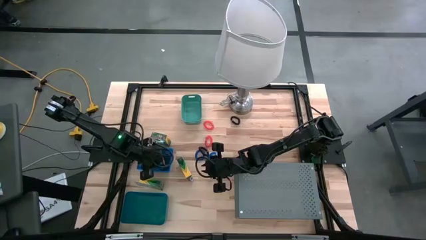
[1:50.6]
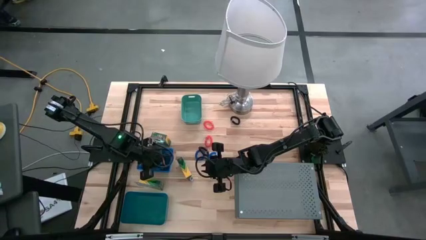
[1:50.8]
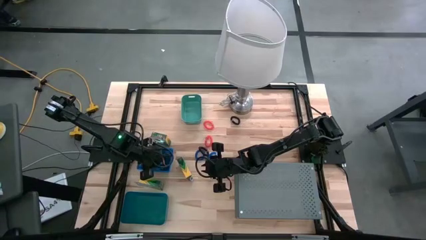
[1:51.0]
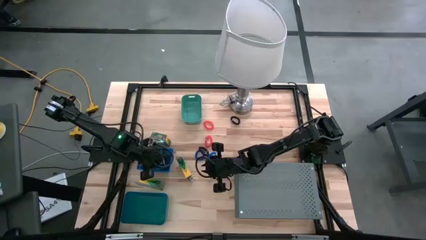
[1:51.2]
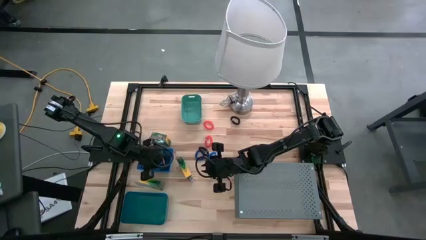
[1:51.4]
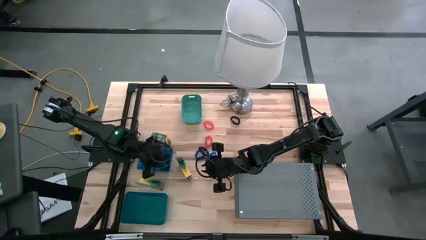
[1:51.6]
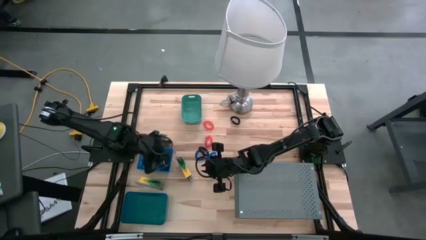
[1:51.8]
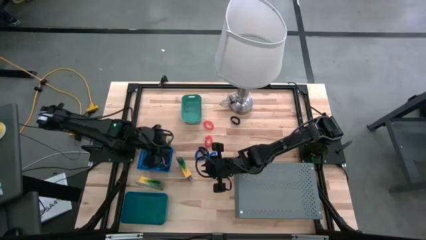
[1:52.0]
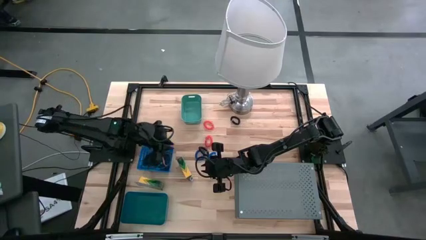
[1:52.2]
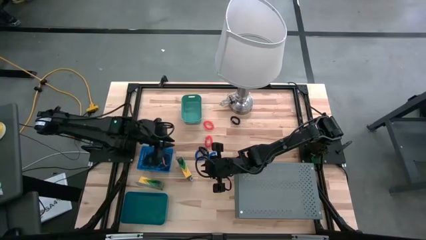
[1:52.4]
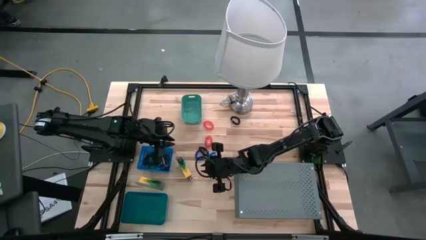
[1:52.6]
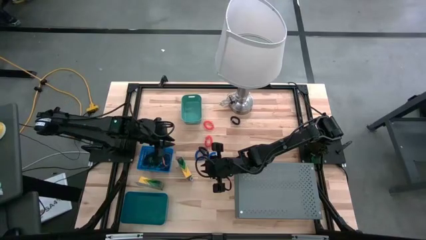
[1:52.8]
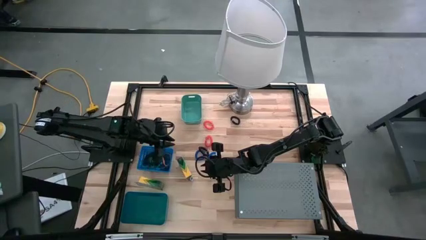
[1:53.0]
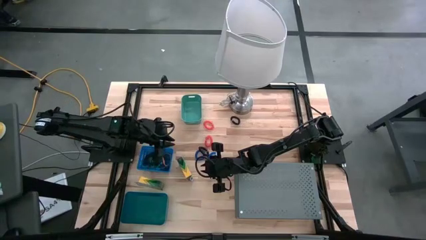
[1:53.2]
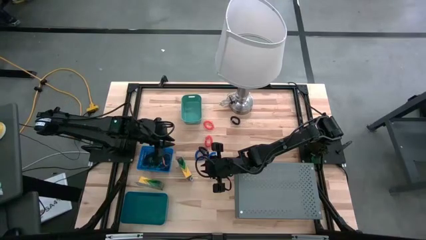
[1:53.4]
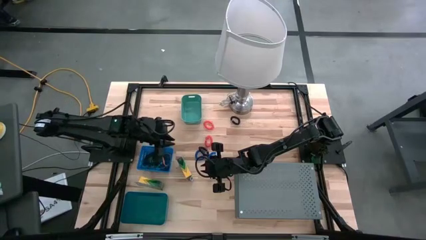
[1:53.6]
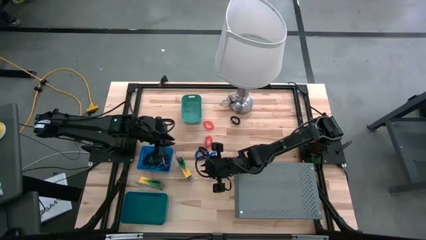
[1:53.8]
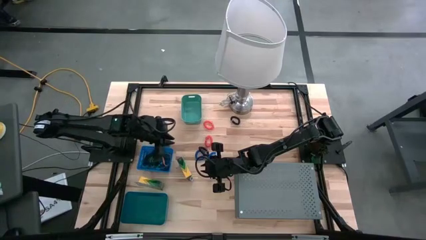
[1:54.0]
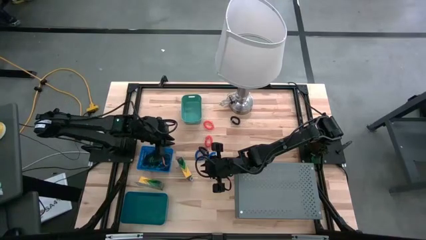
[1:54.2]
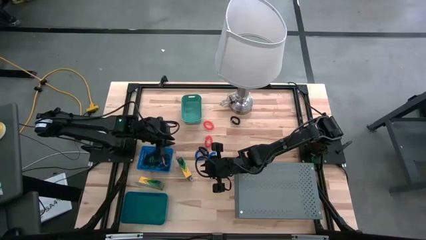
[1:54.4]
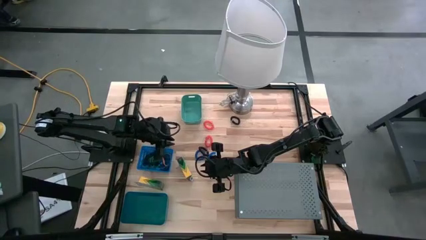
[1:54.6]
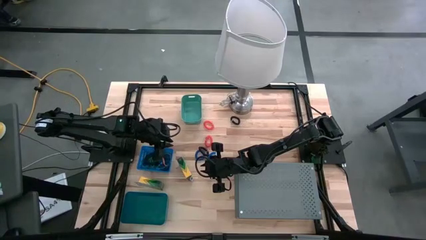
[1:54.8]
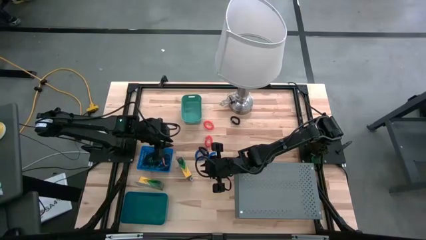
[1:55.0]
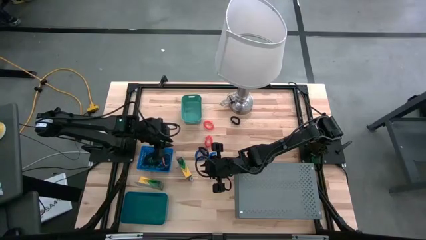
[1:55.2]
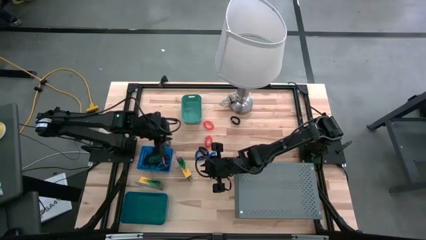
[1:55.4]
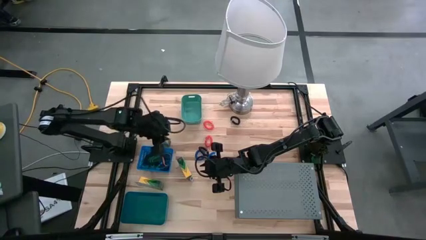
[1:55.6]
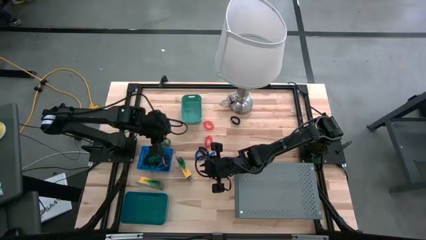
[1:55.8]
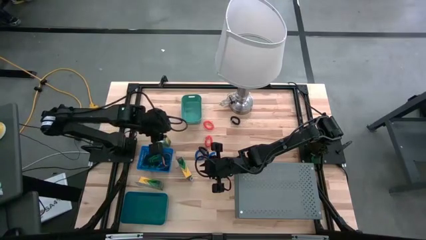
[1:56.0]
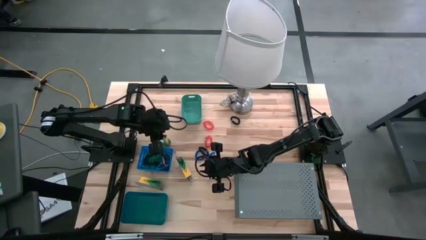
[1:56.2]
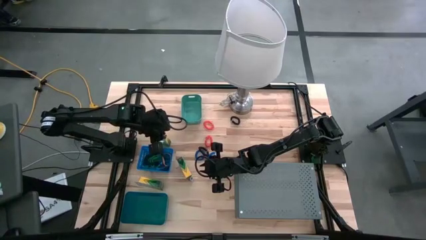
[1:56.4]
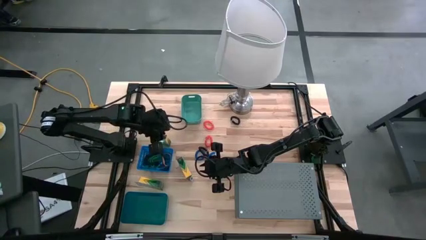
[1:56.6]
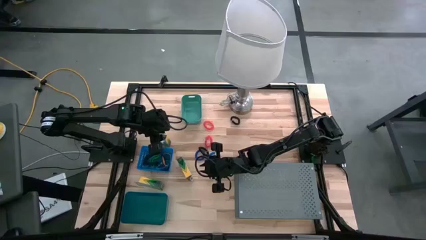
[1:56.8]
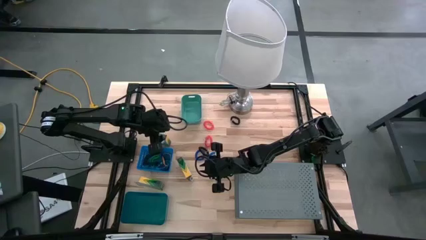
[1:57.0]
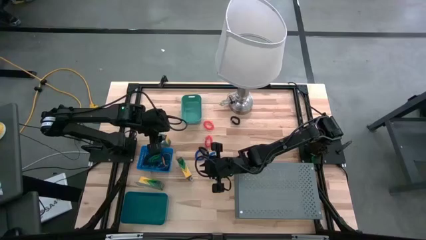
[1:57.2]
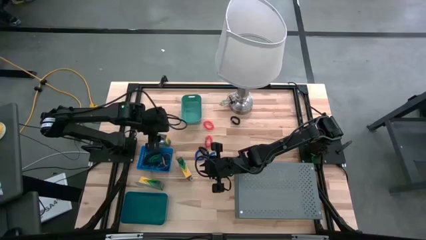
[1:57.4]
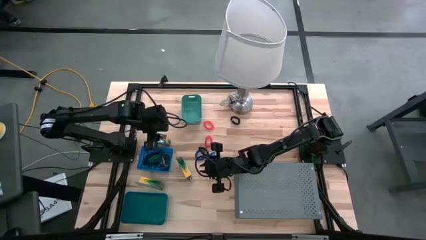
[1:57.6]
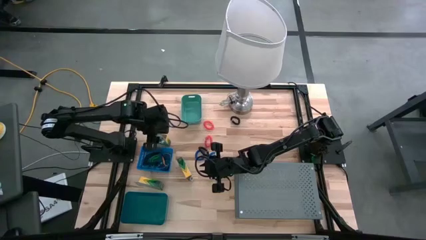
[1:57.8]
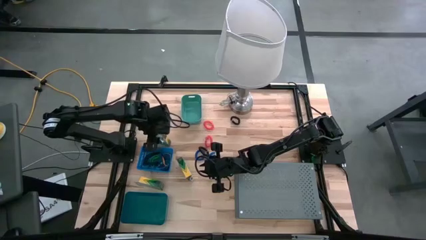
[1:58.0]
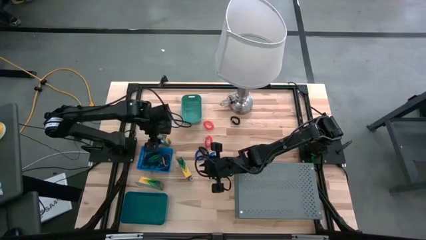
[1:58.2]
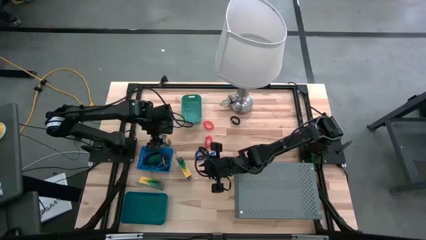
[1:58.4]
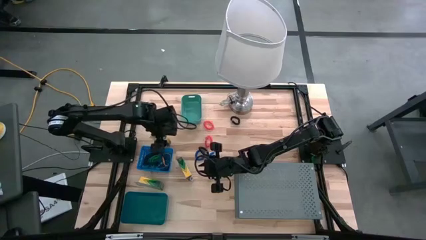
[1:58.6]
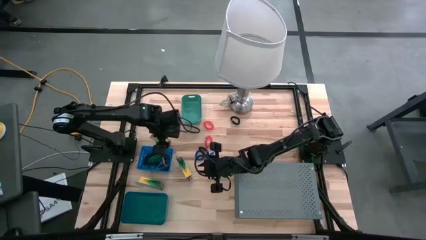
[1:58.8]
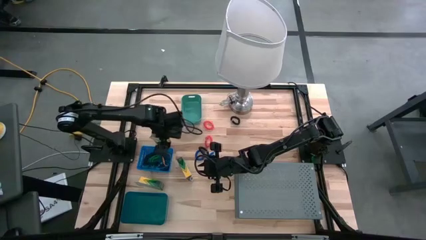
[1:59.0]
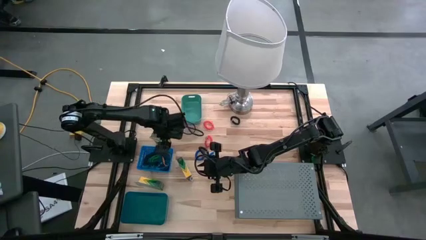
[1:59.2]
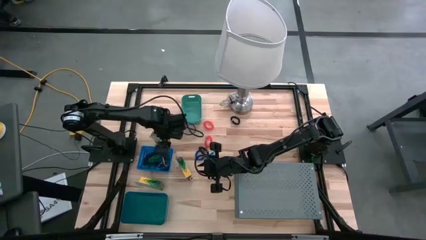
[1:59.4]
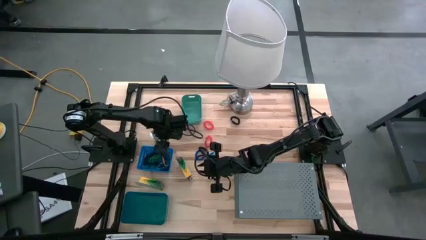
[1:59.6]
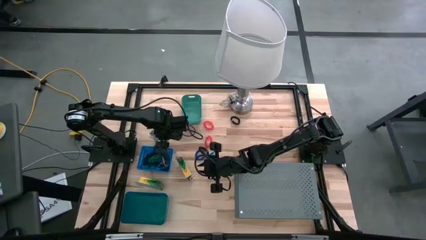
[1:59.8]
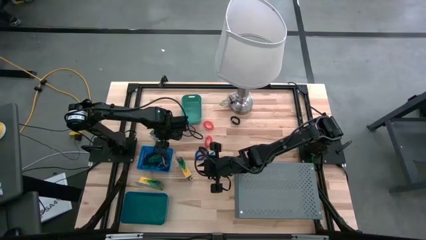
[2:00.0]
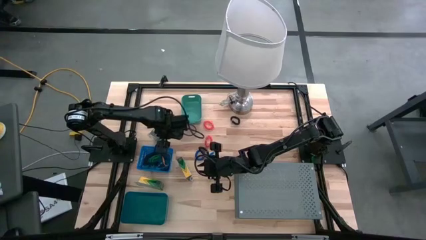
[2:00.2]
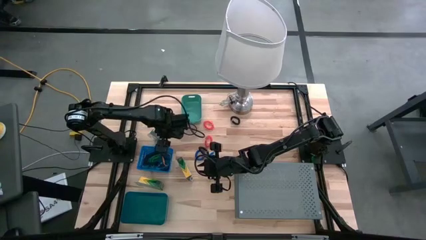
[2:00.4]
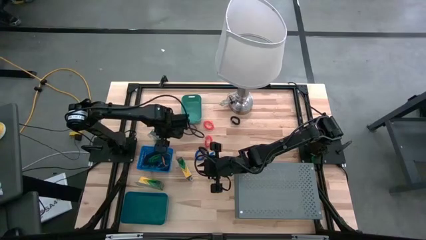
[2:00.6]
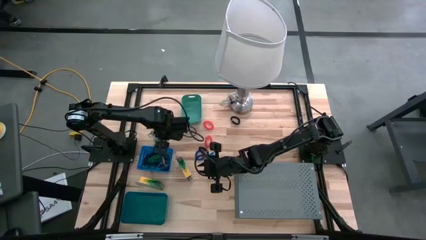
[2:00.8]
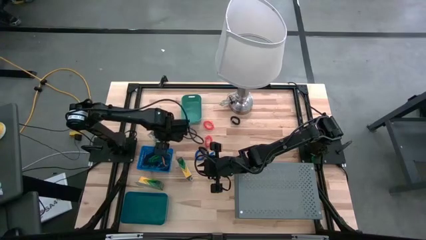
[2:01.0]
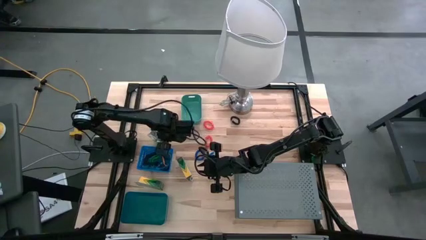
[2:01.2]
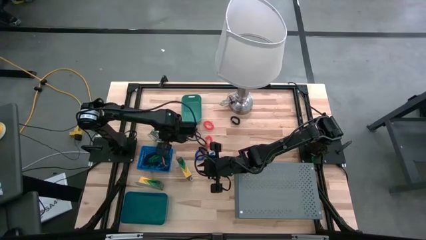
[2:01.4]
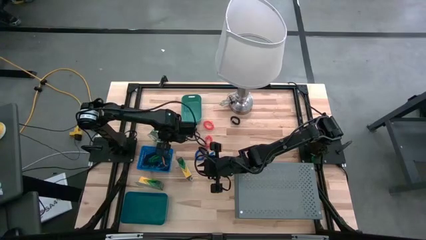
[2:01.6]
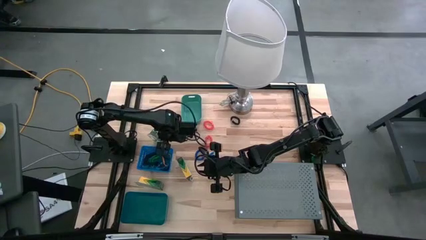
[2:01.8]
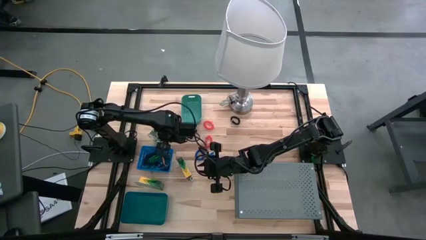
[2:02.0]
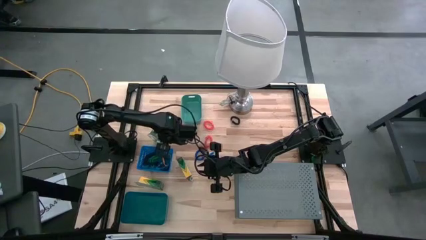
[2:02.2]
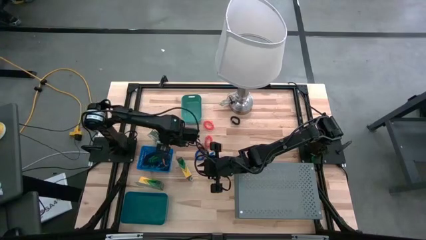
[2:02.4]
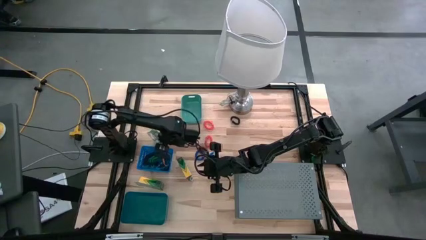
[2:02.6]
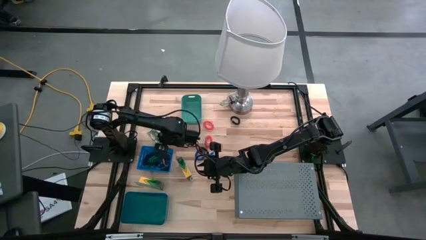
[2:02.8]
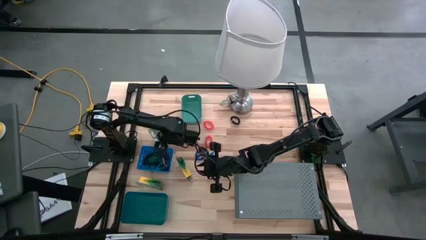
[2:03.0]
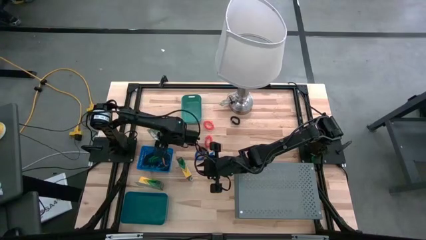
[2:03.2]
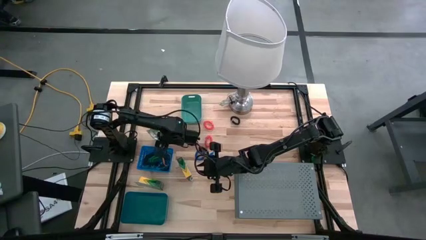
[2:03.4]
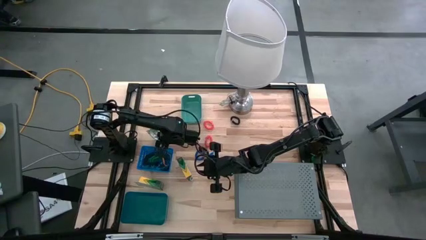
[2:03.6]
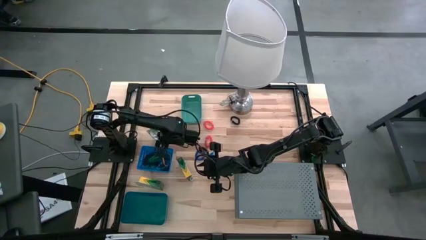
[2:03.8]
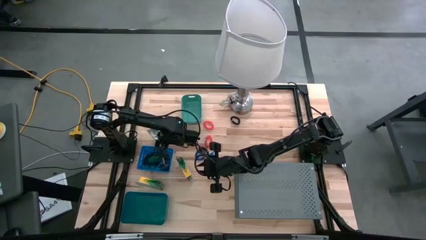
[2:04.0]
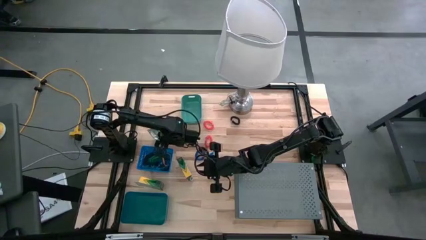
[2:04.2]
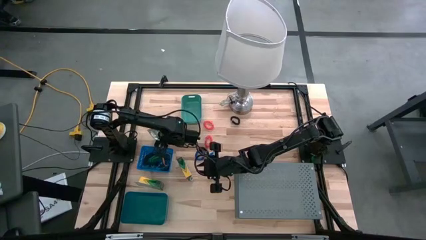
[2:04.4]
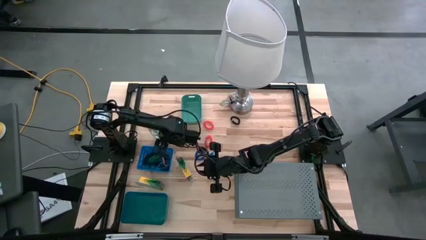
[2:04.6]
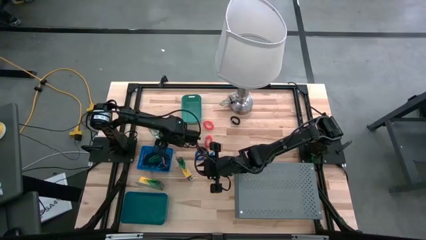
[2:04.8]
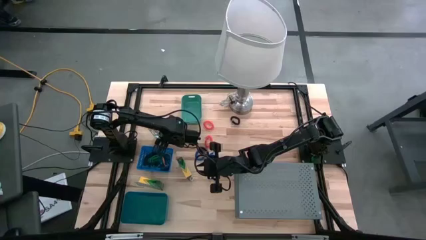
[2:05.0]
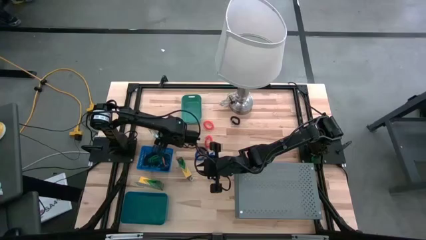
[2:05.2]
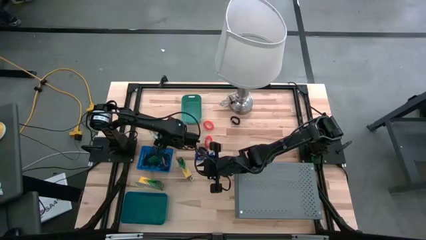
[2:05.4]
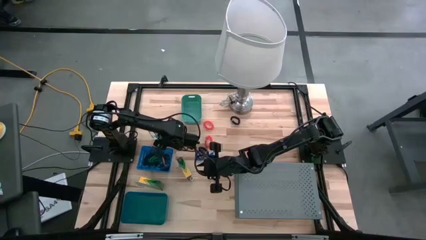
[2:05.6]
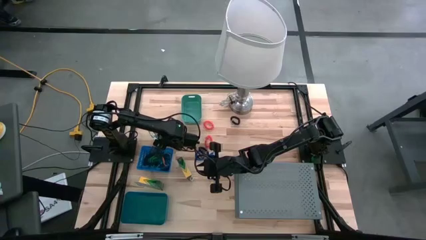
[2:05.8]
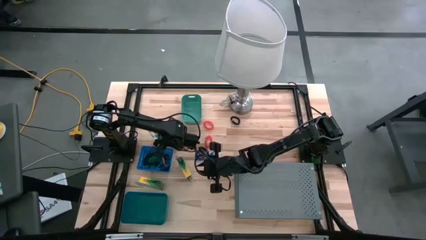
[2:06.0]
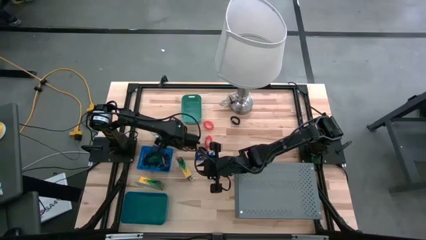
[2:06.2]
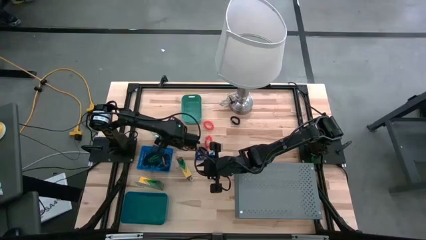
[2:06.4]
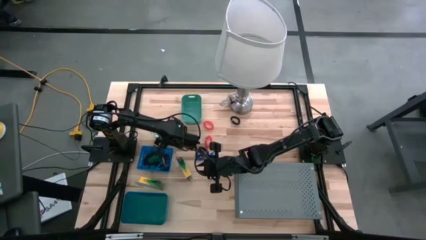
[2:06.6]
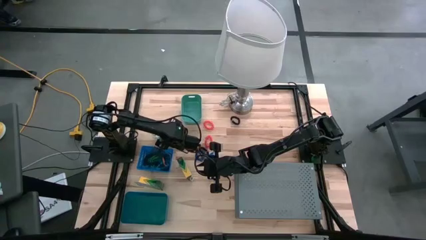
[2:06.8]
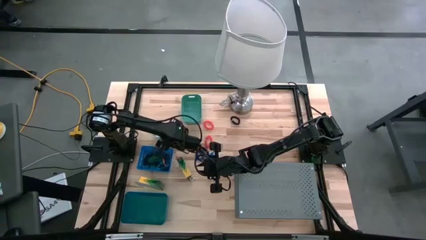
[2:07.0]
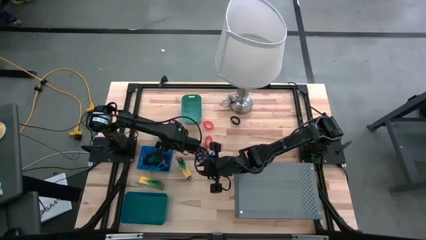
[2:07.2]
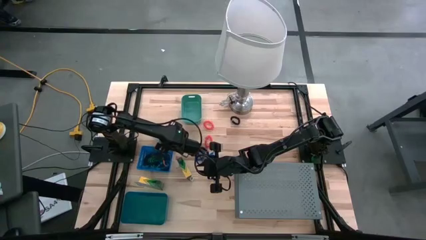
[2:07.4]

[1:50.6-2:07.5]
Task: Pick & Place Office Desk Supplies
Put the pack of crayons into the bottom blue bin

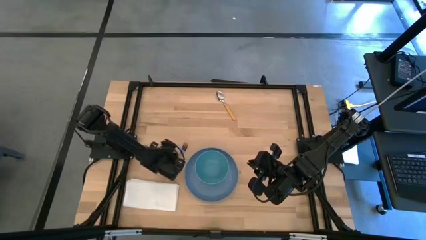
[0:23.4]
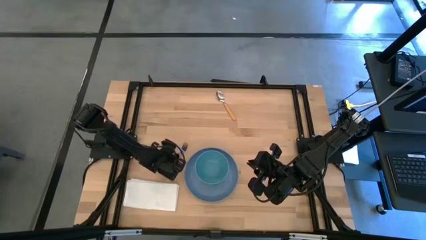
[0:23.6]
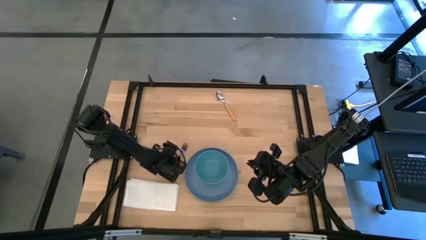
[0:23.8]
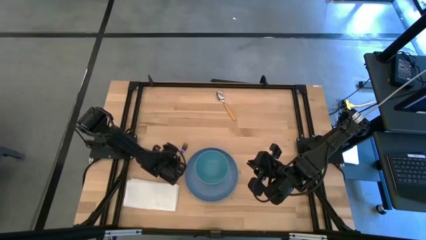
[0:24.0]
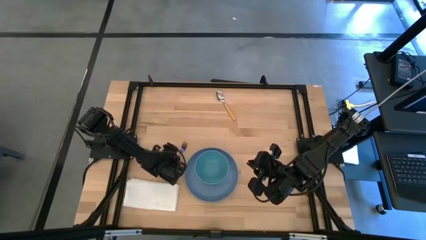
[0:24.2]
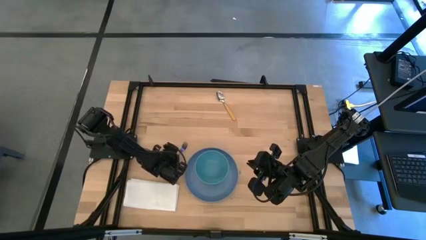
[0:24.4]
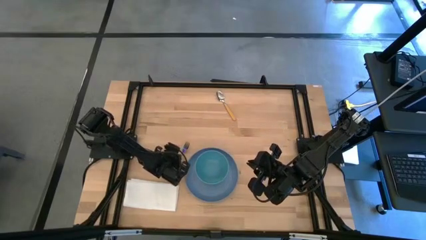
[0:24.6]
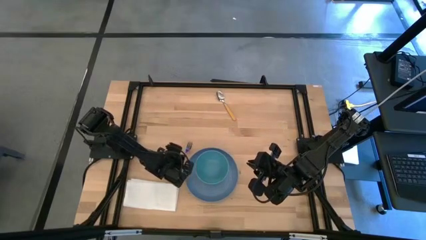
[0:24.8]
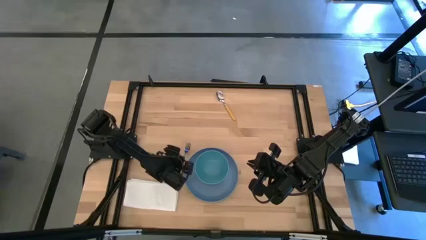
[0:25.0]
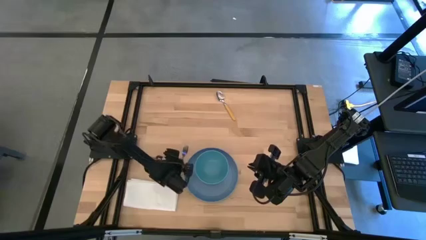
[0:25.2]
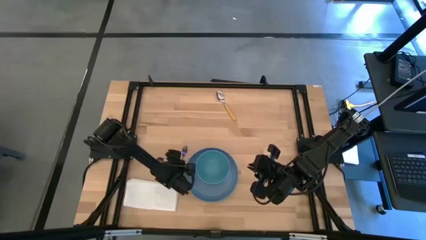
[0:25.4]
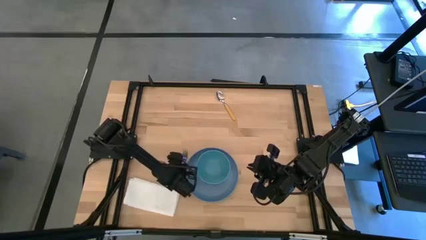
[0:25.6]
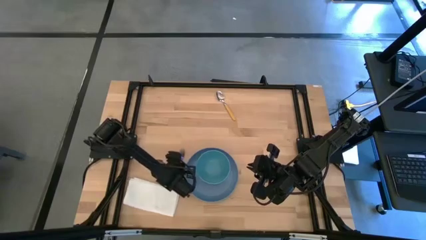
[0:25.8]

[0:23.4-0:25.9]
Task: Set table place
Move the fork to the middle left of the table
